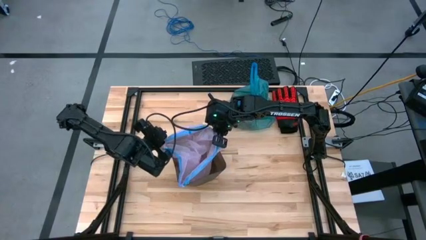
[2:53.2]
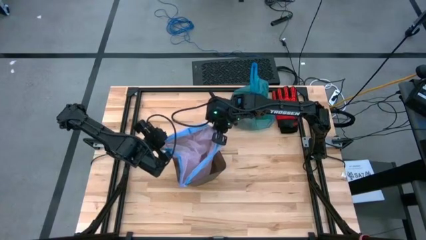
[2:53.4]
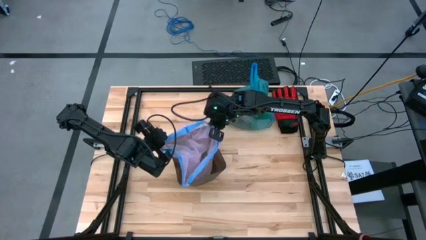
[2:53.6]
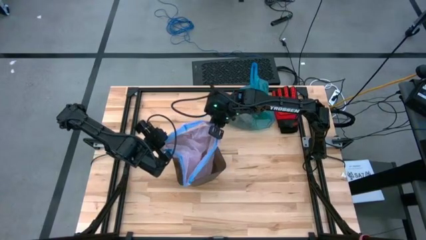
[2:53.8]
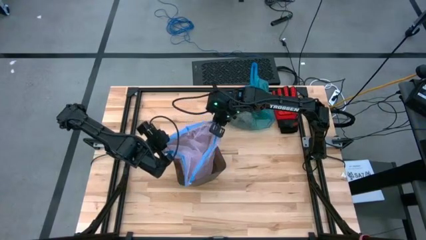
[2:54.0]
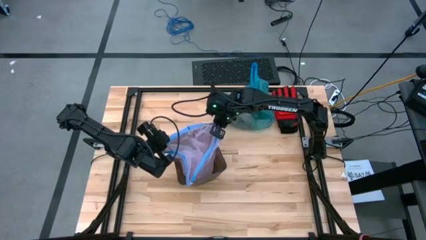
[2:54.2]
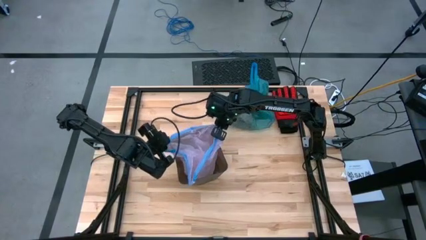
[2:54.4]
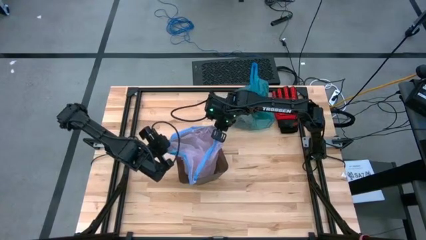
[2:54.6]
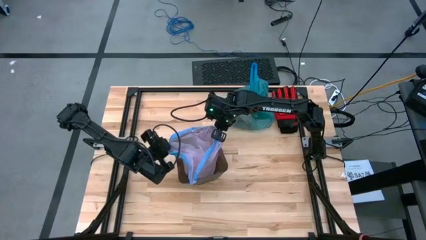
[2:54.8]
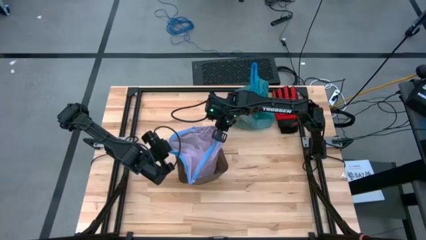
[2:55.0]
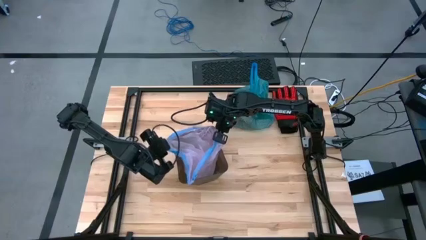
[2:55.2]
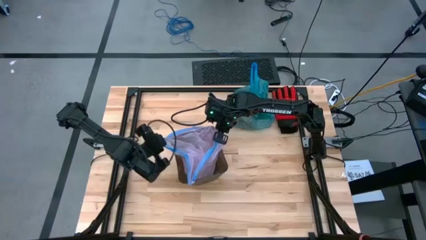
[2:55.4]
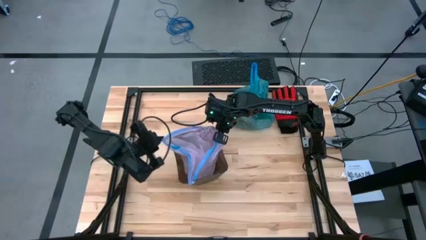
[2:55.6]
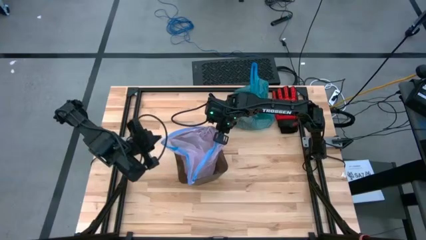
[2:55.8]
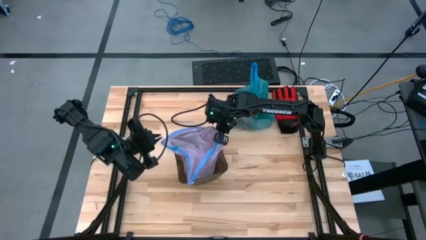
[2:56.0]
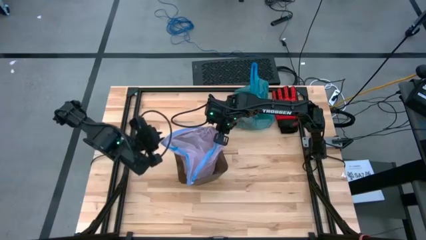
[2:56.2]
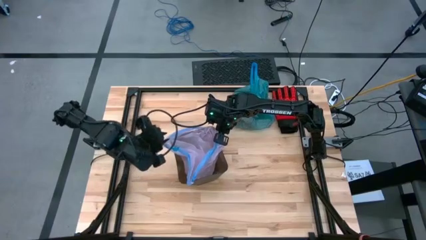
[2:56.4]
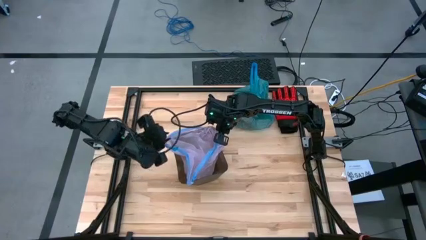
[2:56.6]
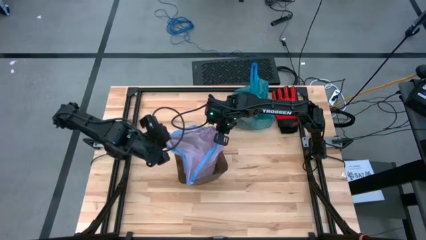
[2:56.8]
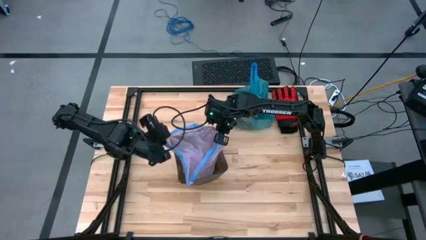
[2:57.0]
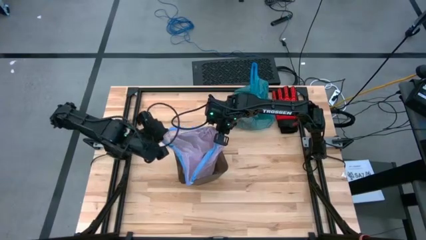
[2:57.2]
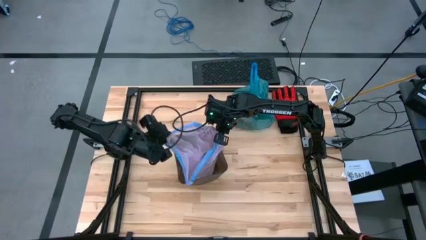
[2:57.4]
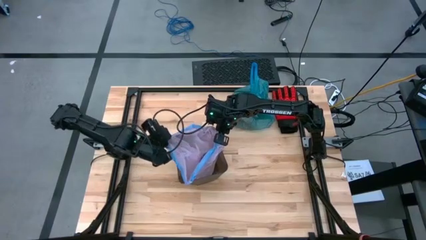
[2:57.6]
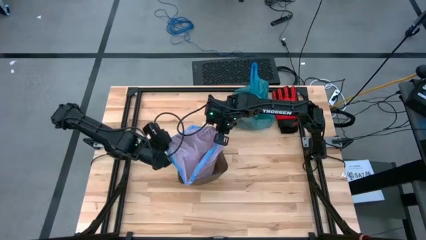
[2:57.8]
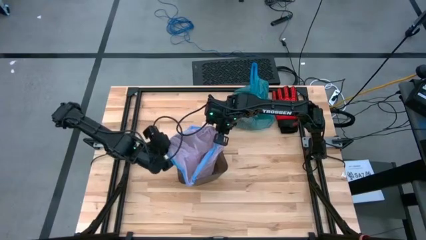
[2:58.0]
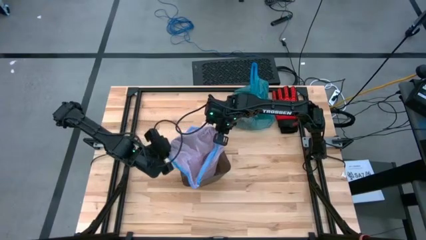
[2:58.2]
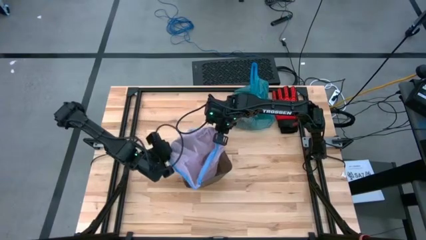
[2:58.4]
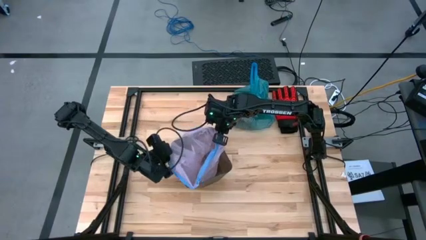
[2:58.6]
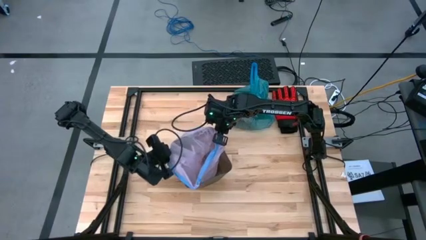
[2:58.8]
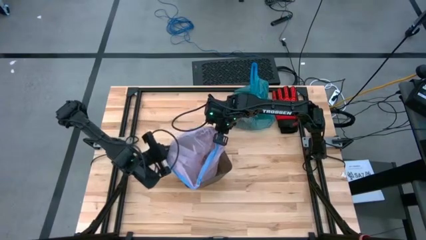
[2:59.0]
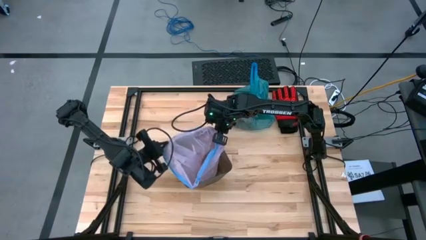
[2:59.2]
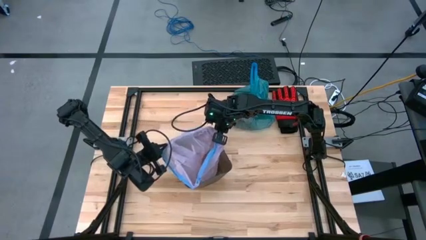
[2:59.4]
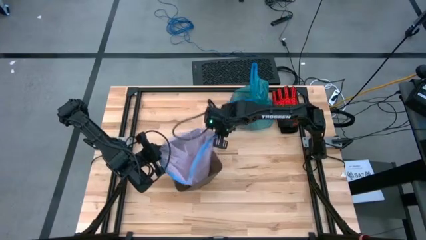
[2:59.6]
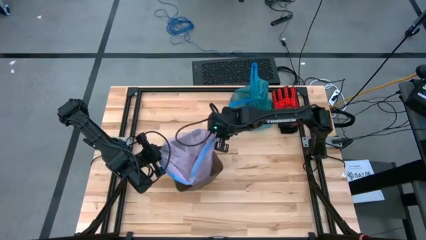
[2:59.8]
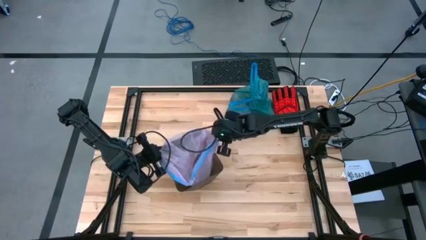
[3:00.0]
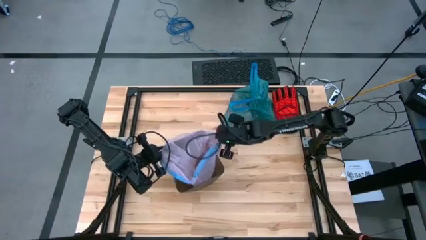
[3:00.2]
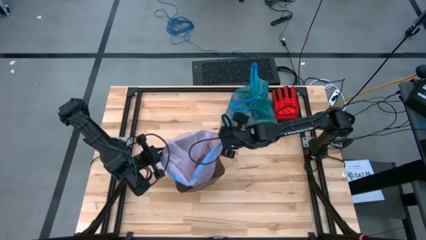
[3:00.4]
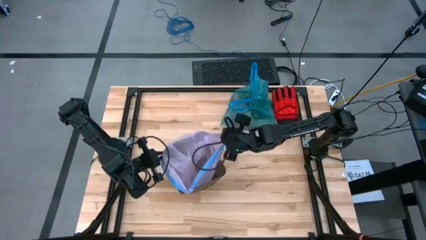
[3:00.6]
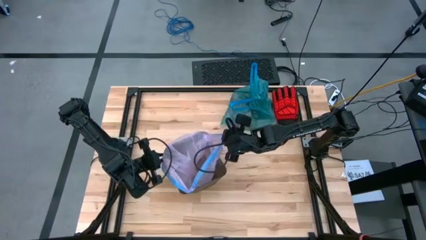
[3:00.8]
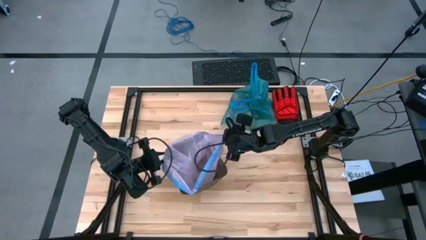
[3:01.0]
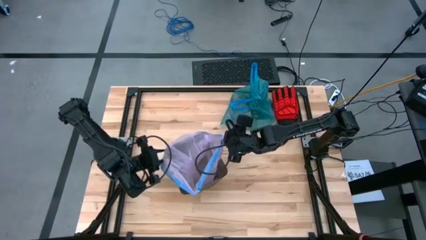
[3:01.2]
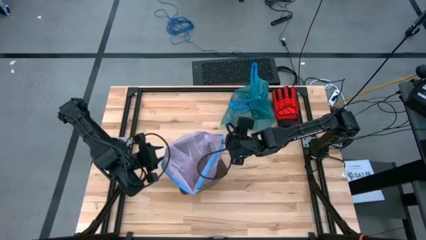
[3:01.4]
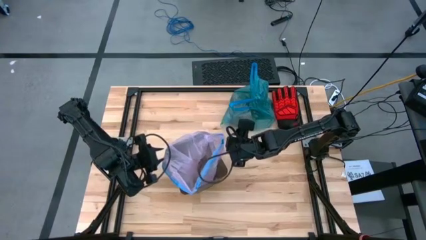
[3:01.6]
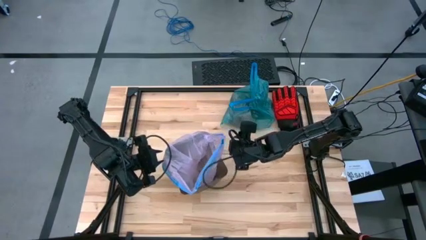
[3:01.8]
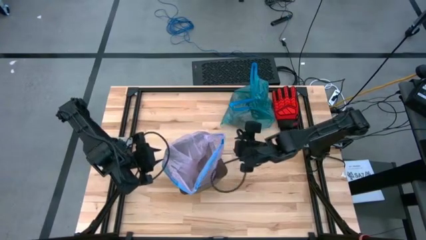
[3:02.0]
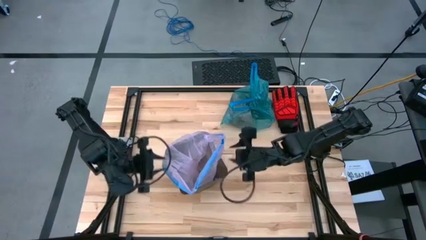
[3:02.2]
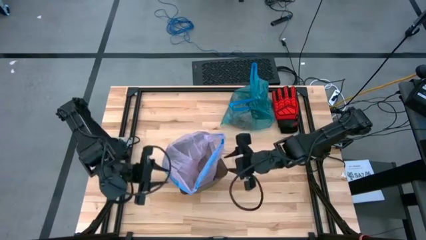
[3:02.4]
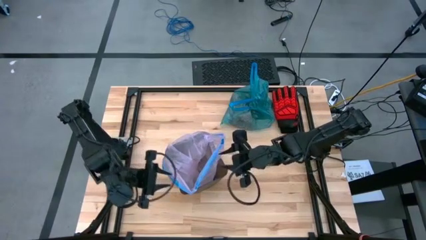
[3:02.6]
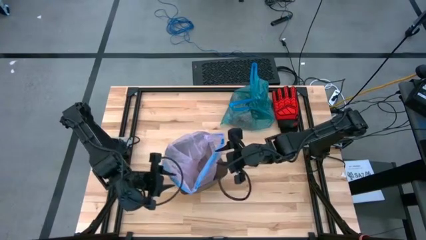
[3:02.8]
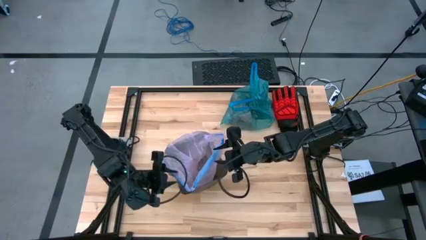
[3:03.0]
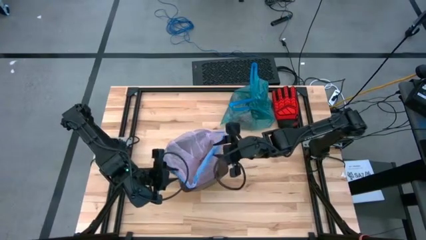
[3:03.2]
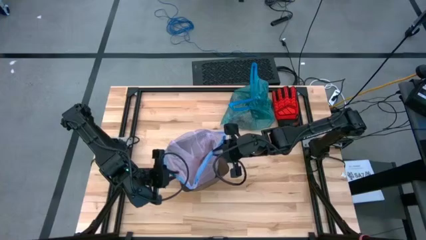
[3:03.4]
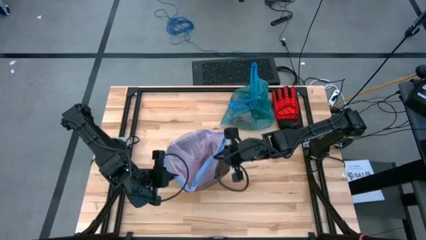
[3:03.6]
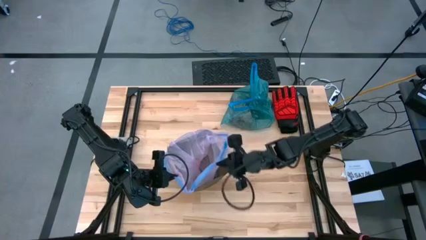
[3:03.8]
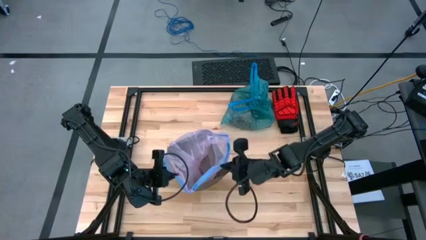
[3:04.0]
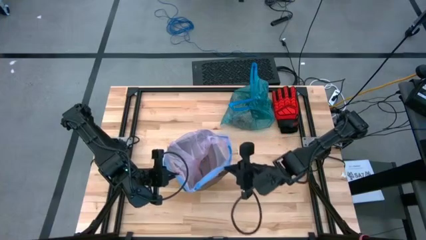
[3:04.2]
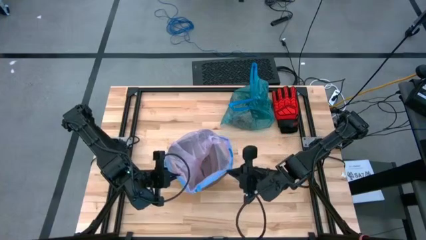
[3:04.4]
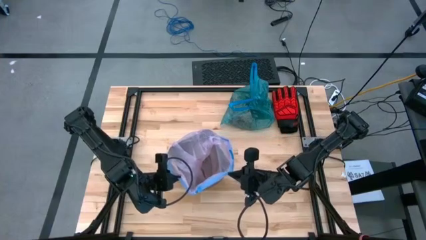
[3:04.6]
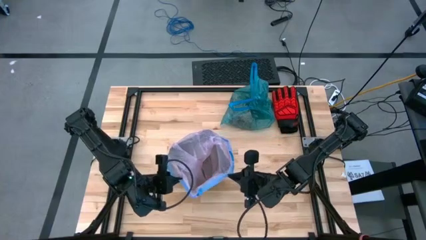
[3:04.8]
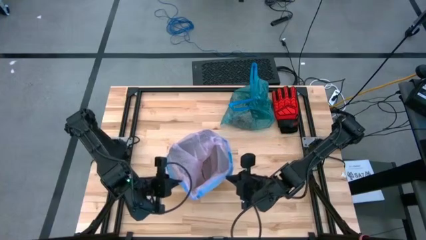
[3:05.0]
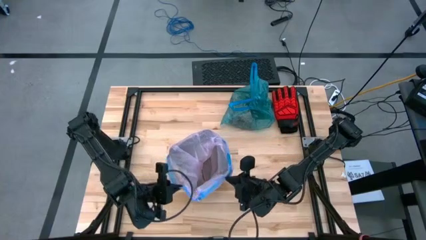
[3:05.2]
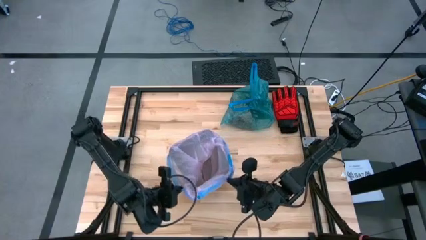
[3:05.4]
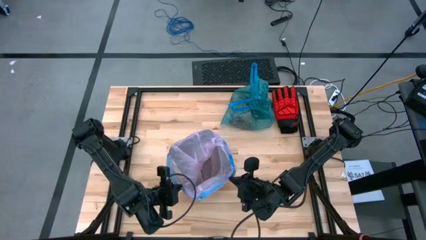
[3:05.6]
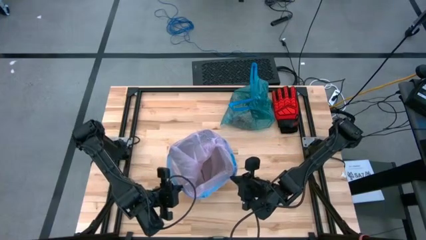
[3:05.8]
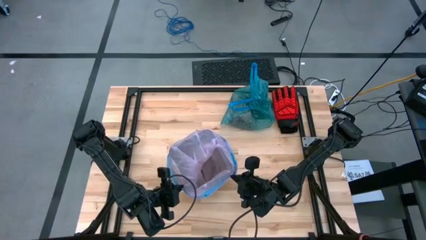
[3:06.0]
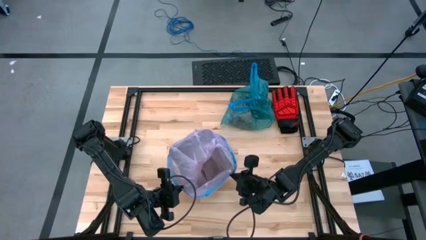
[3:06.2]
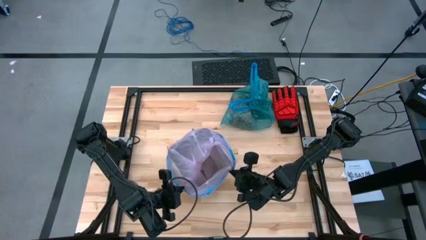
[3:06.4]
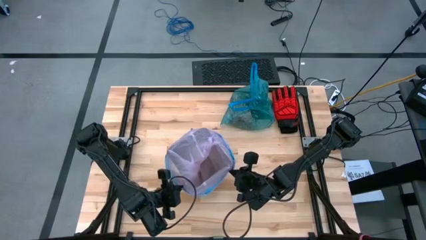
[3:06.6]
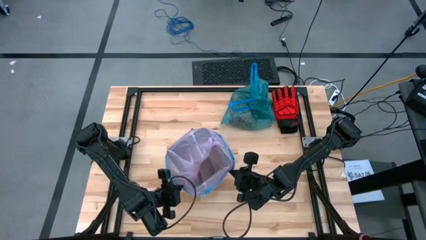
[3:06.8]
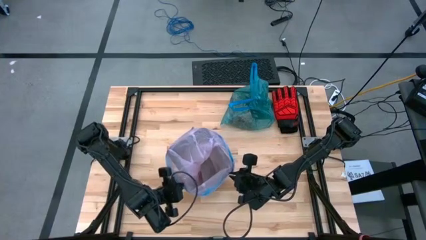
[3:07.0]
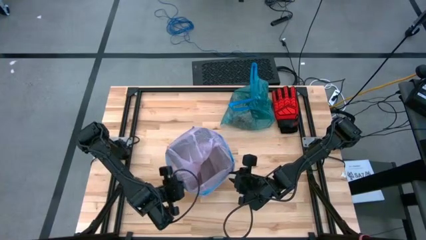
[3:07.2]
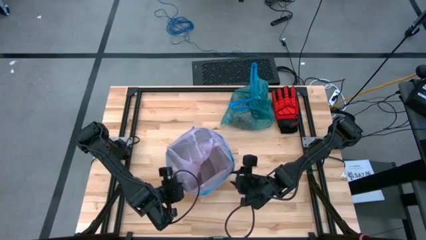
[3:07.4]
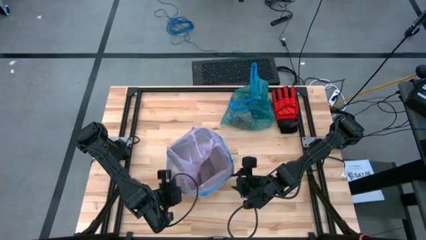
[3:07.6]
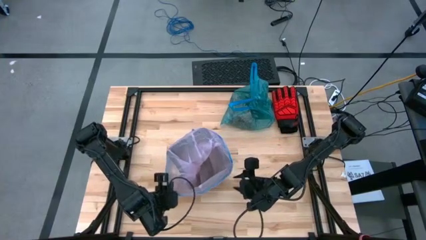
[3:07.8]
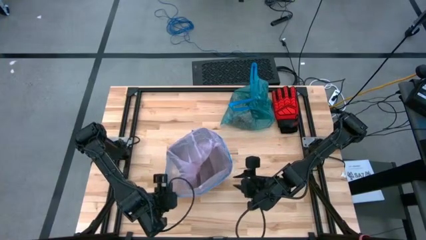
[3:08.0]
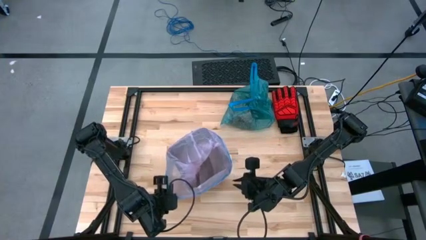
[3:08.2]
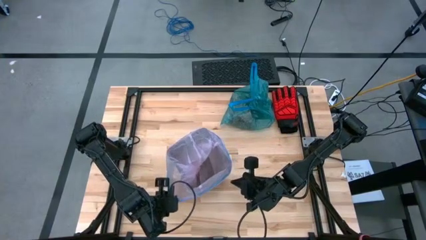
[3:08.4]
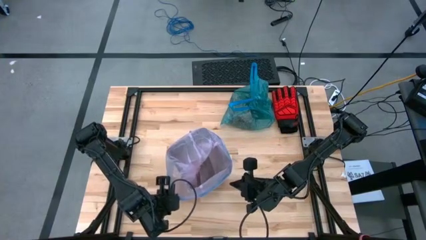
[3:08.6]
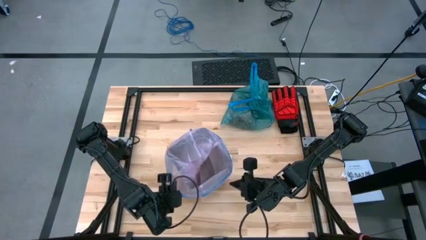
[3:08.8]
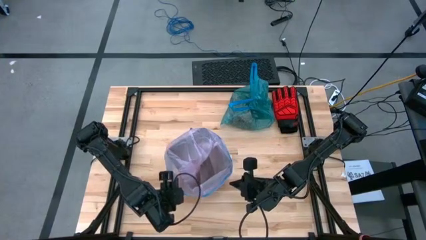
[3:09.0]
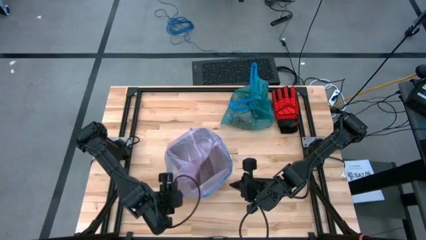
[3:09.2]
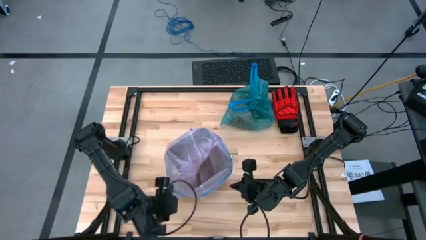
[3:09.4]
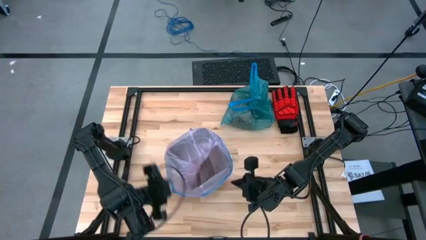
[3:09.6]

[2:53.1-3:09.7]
Task: place trash/remove bag and relplace
Insert the pink trash bag into the black trash bin
